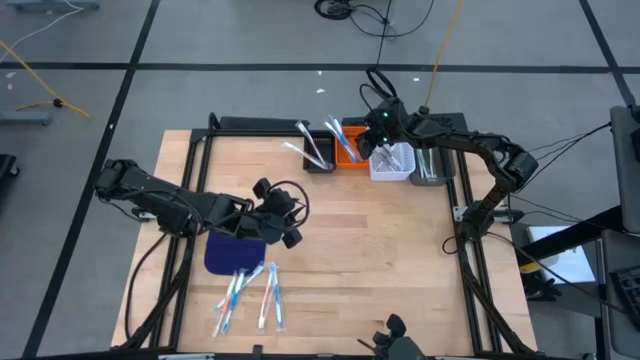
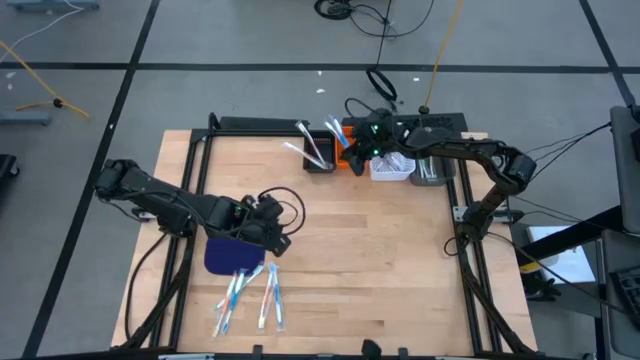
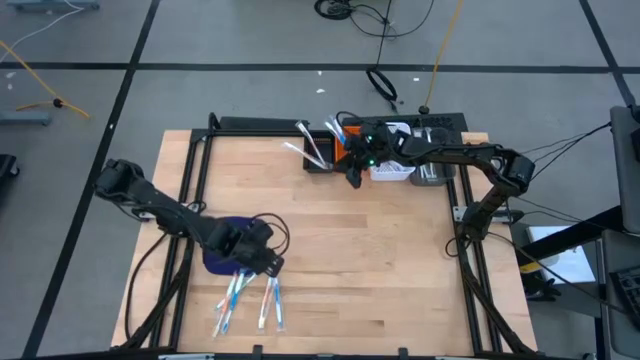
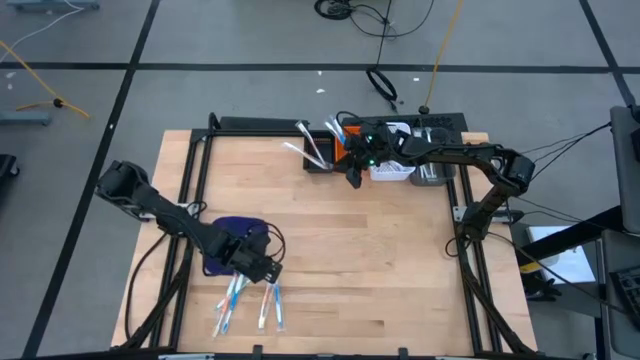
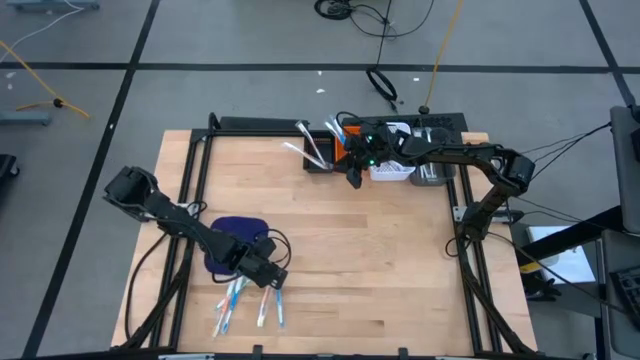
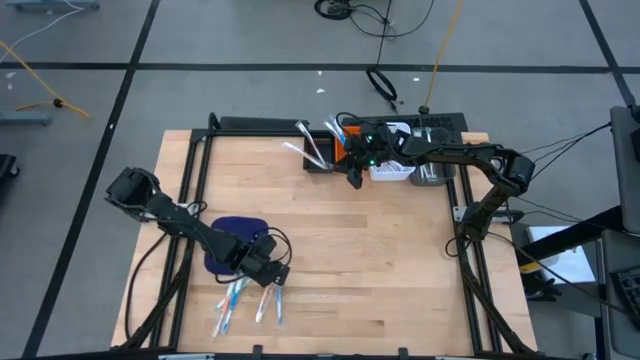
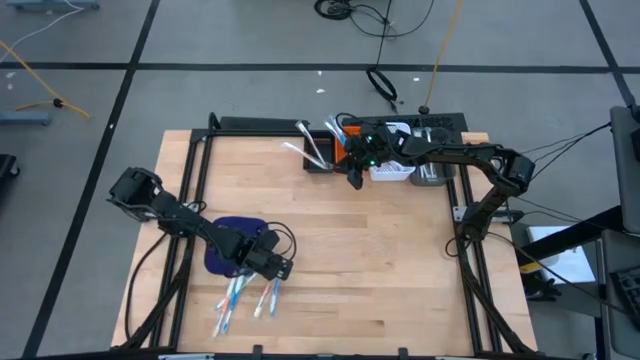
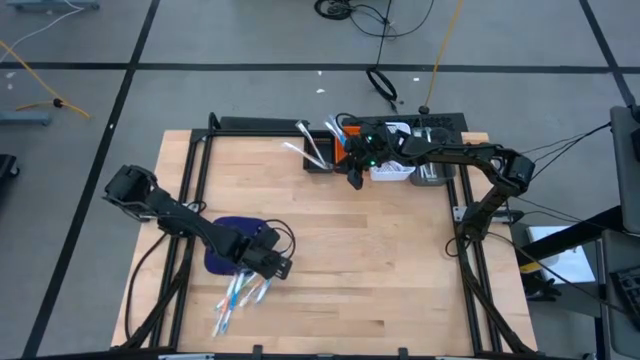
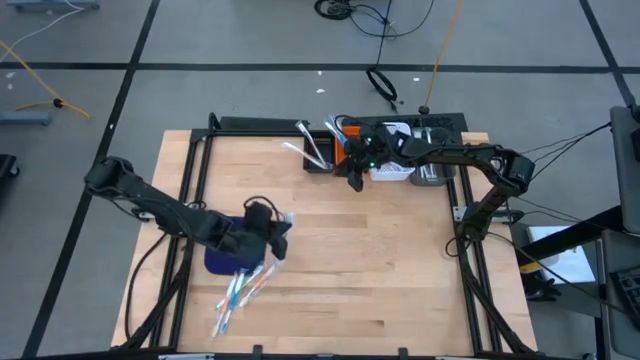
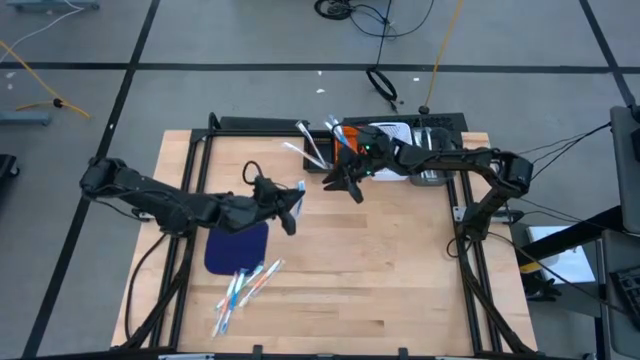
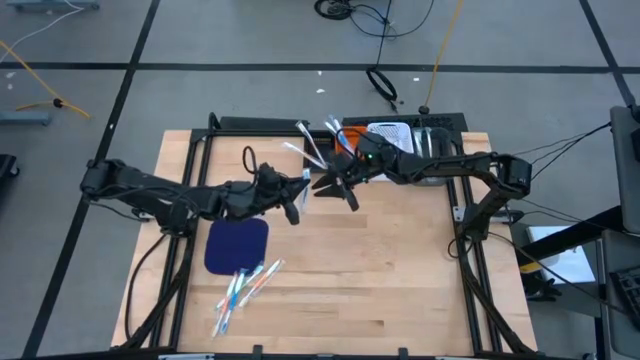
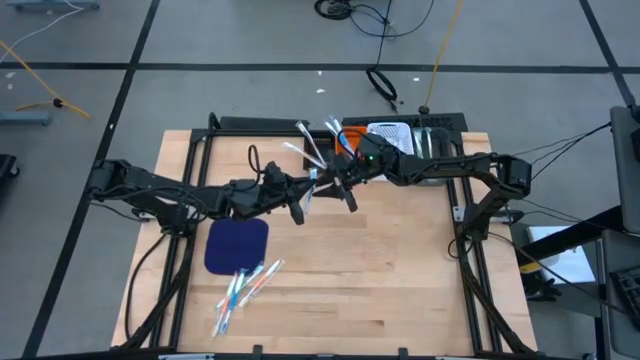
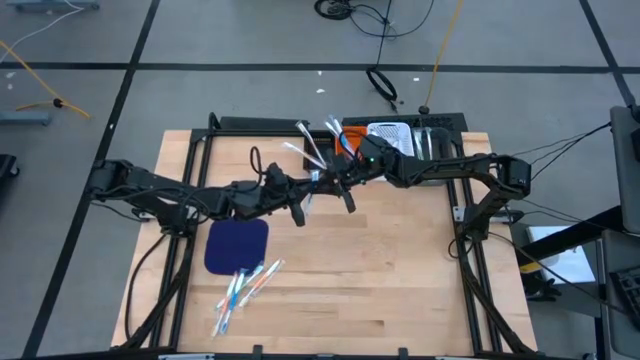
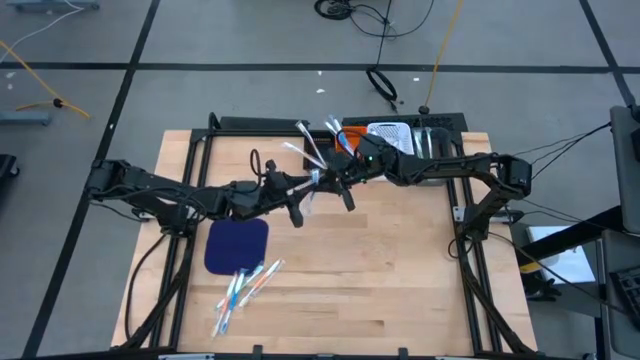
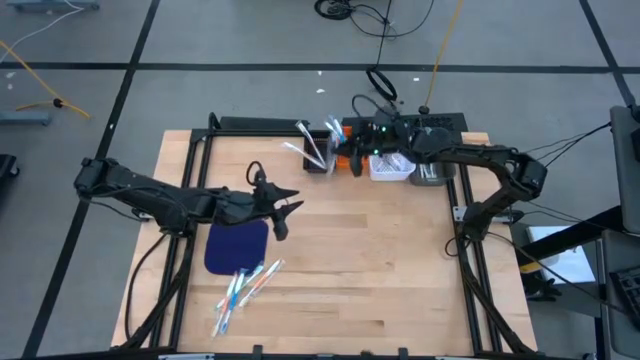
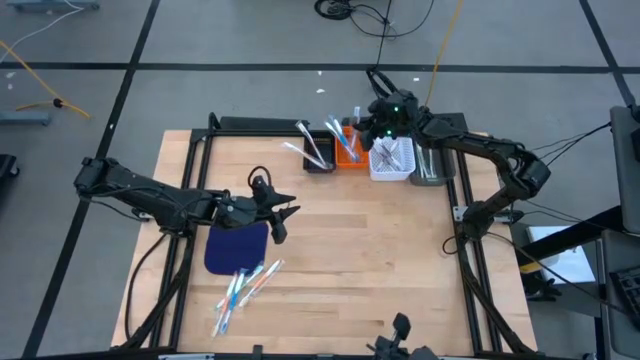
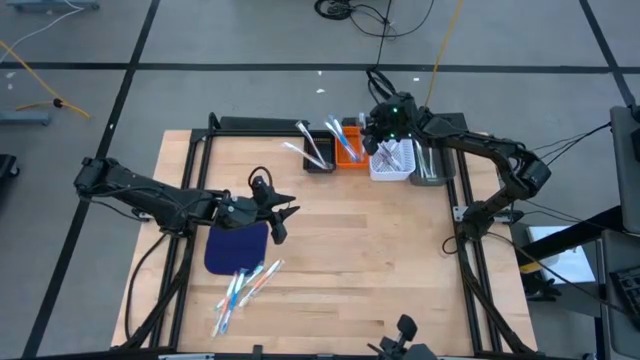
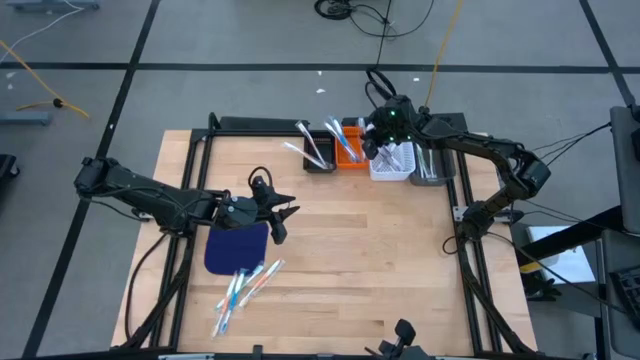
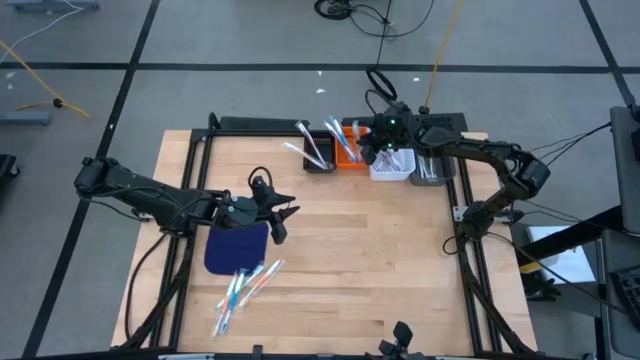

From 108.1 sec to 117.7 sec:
Task: Pick & Place Toothbrushes
Put the blue toothbrush into the orange bin

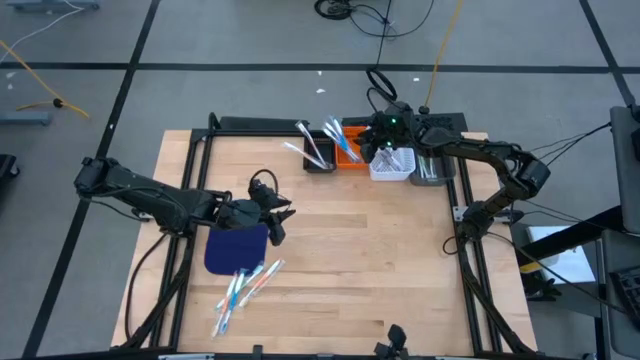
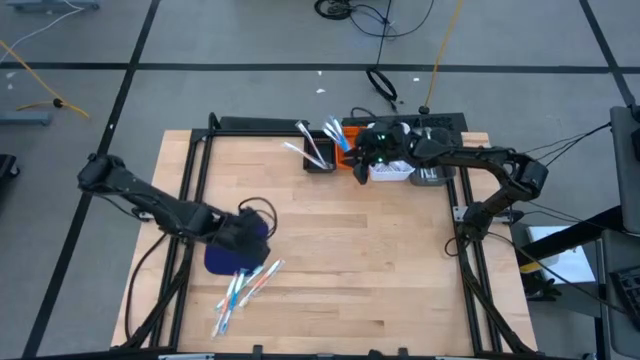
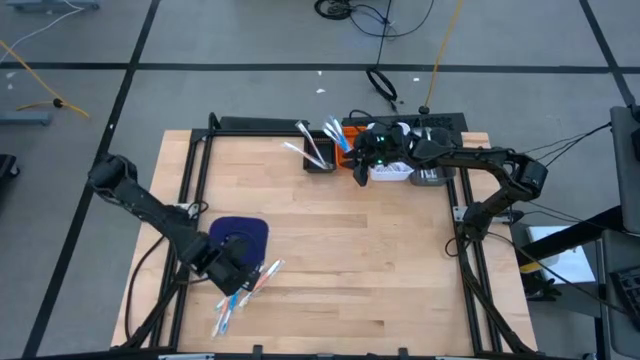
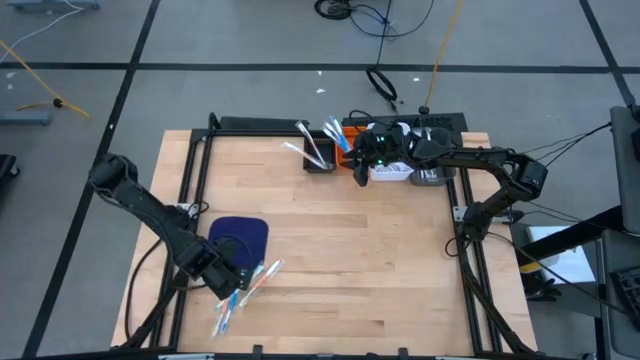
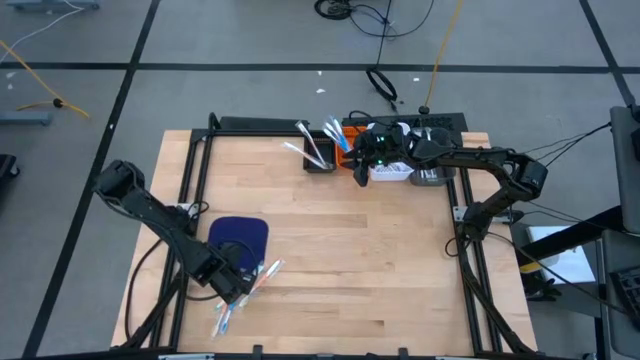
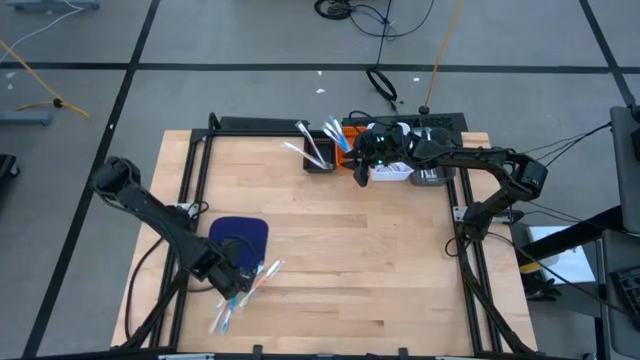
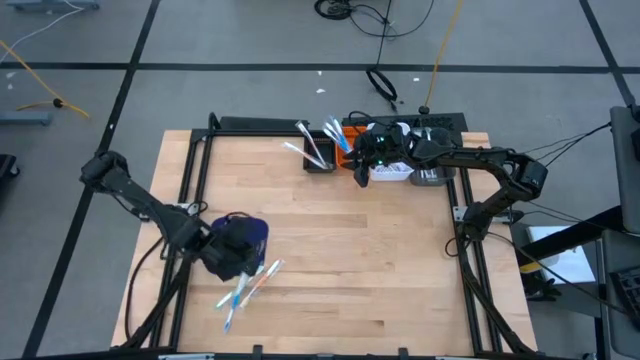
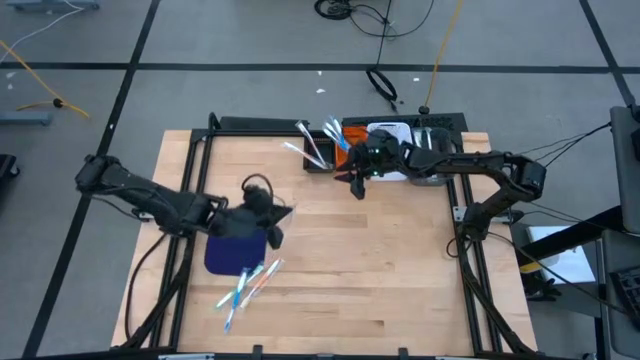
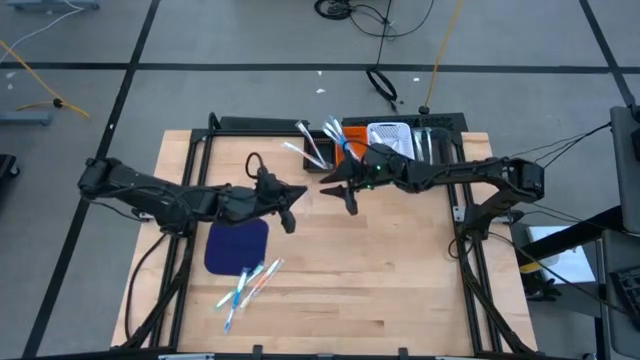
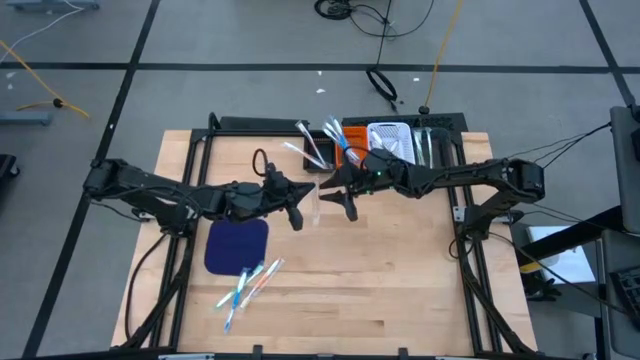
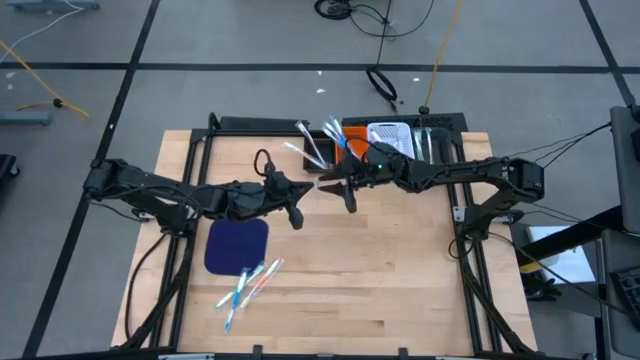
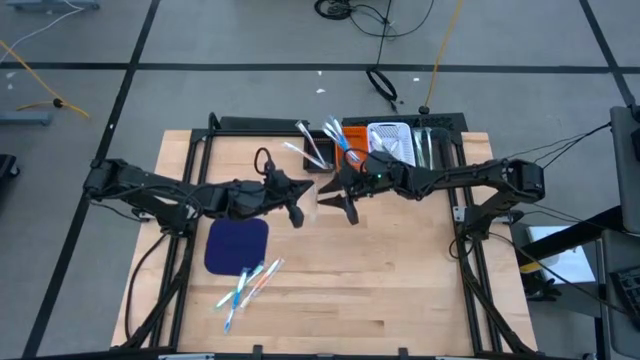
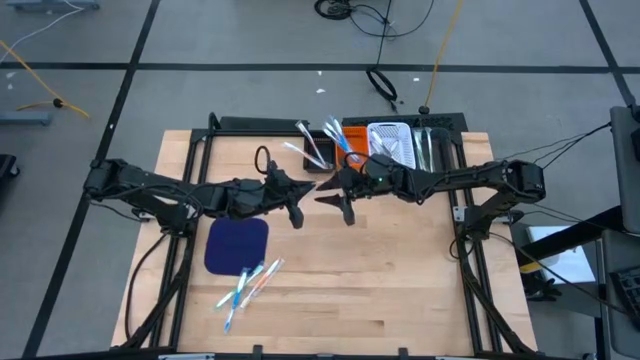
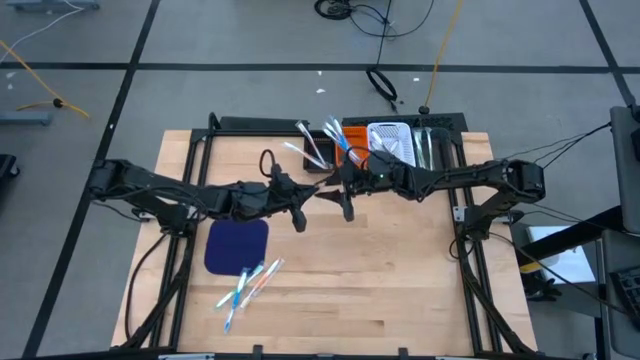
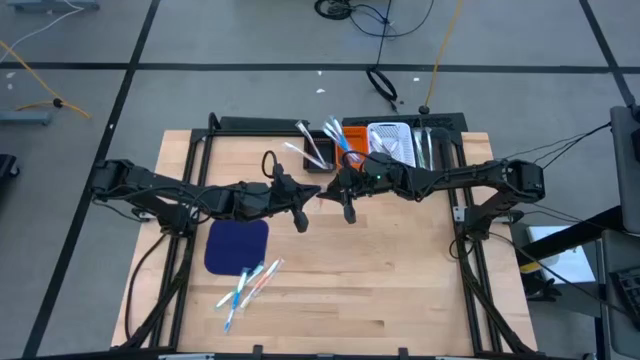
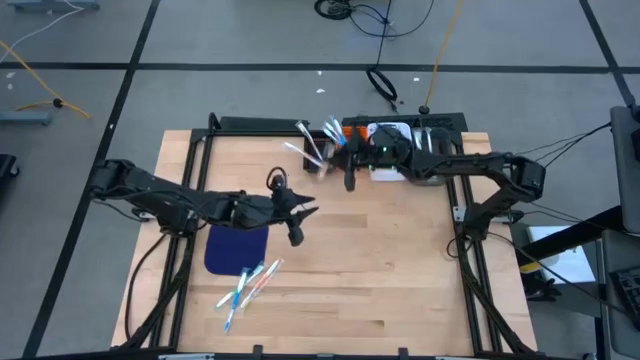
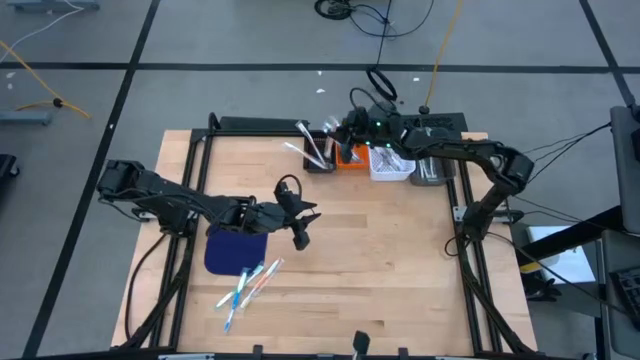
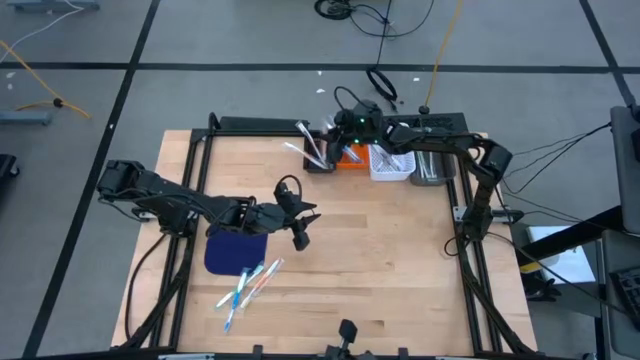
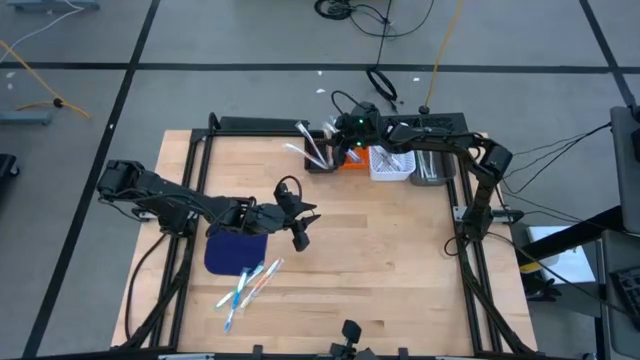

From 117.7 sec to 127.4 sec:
Put the orange toothbrush into the black bin

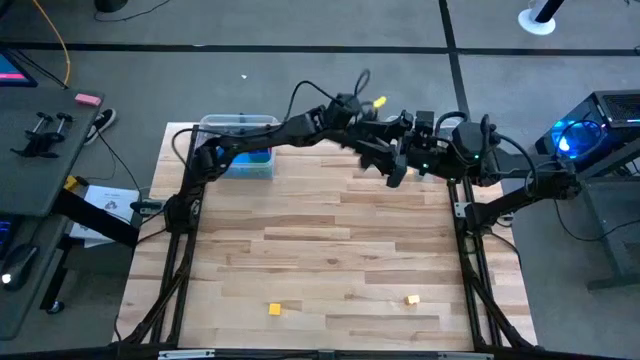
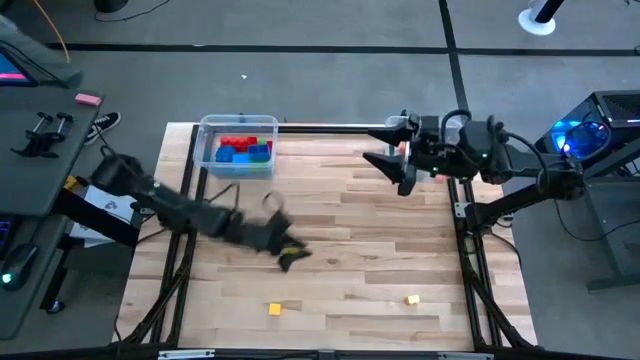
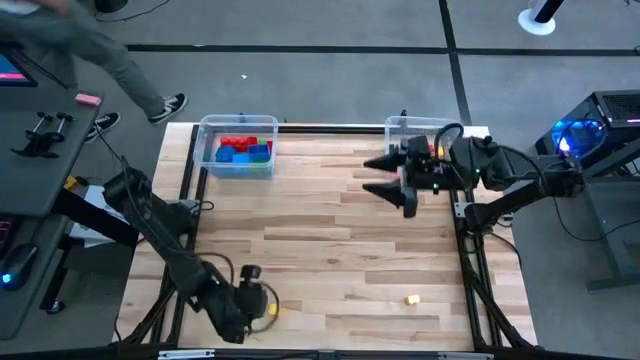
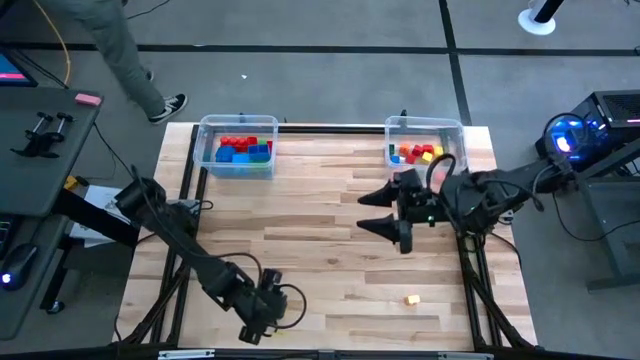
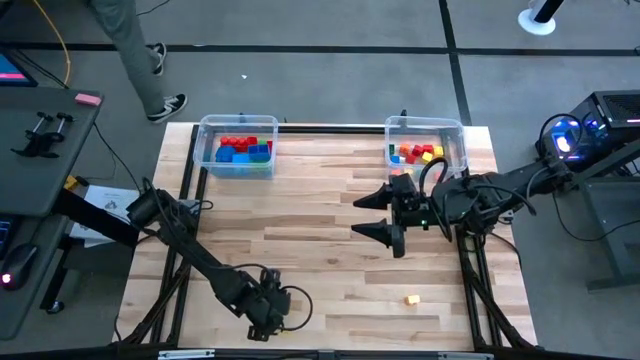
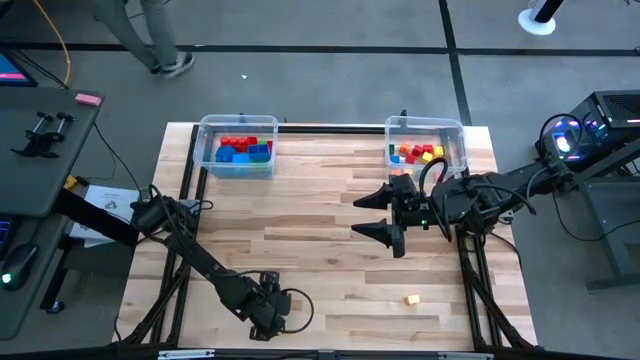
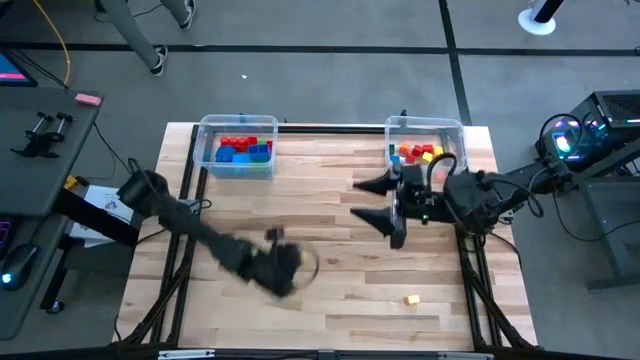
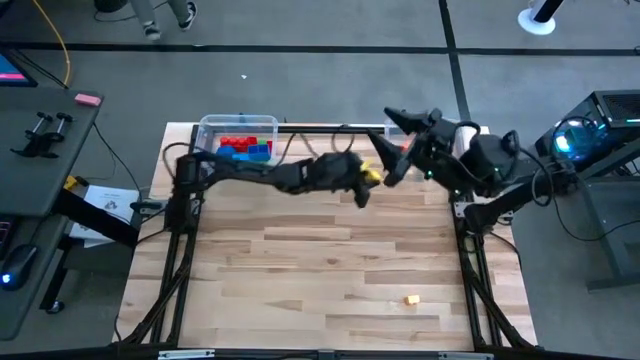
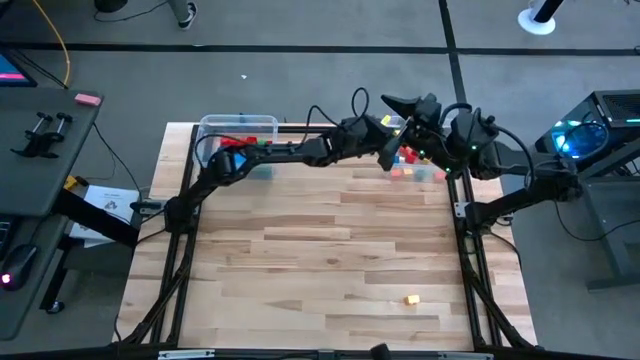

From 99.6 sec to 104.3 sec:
Task: Sort blocks by size
Put the small block into the right transparent bin
